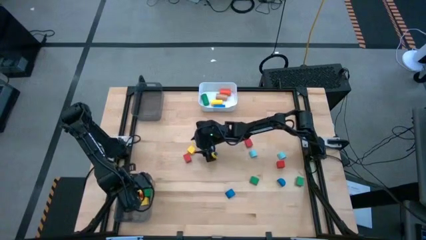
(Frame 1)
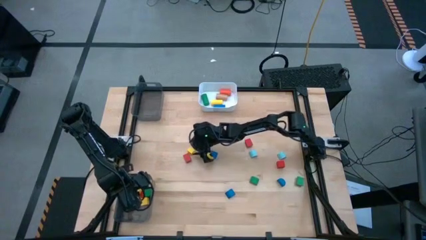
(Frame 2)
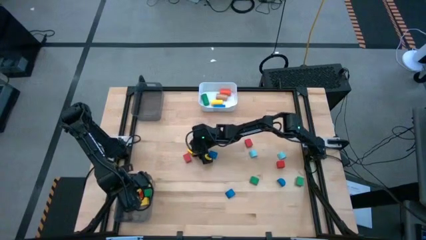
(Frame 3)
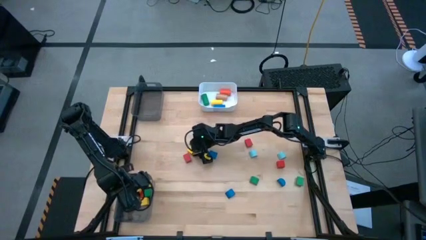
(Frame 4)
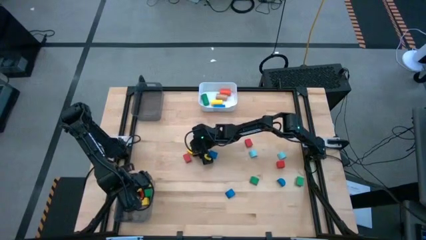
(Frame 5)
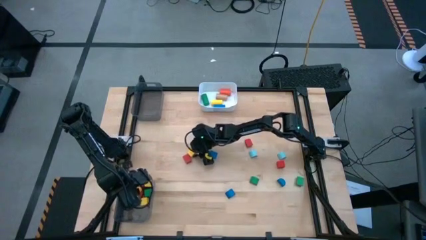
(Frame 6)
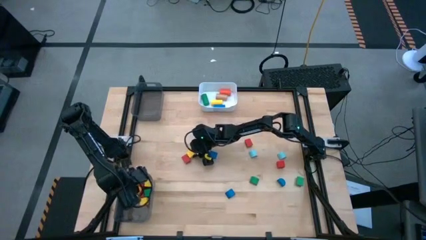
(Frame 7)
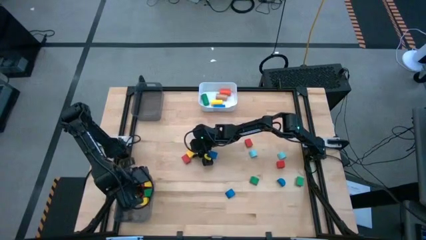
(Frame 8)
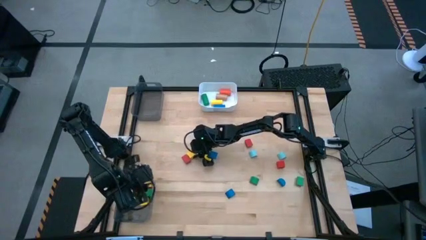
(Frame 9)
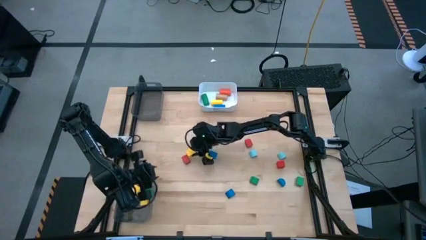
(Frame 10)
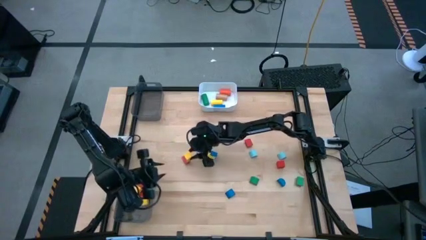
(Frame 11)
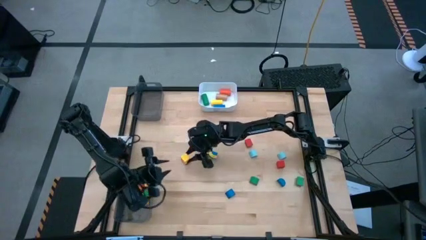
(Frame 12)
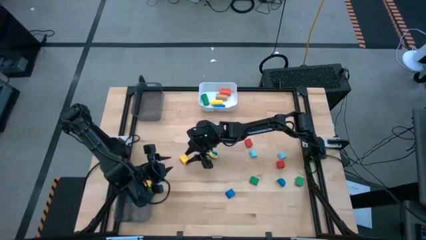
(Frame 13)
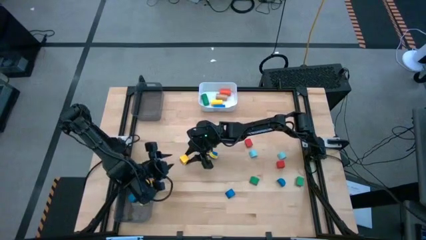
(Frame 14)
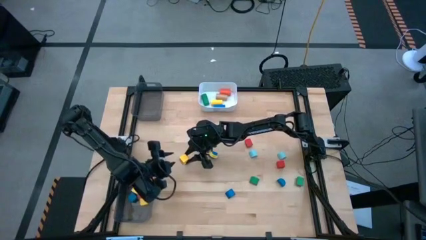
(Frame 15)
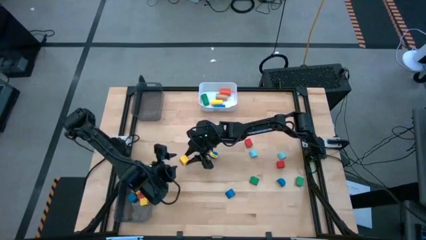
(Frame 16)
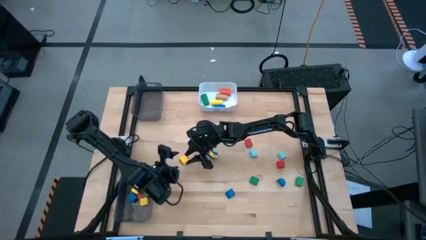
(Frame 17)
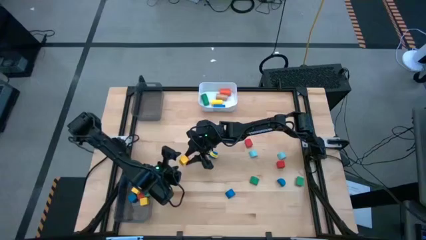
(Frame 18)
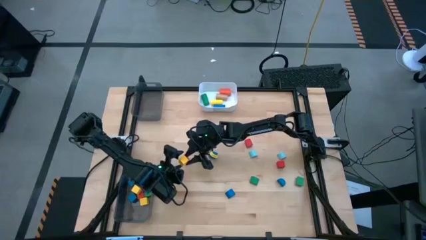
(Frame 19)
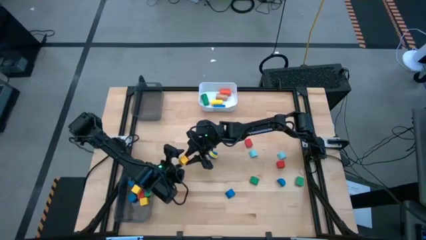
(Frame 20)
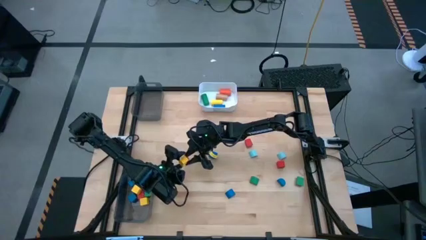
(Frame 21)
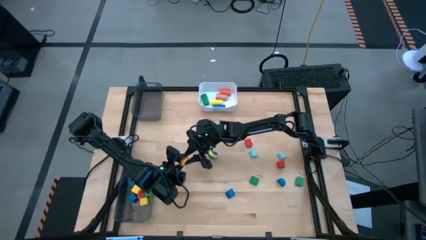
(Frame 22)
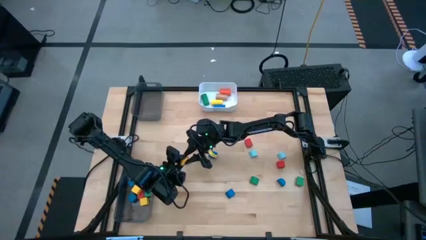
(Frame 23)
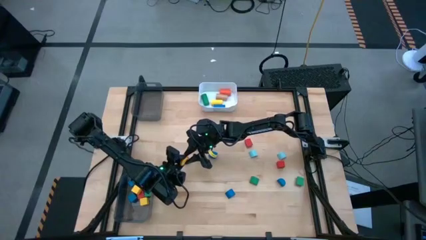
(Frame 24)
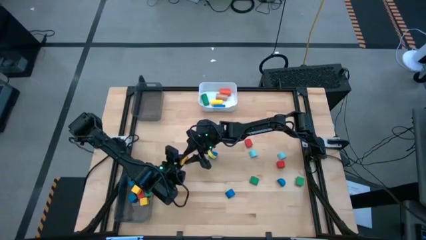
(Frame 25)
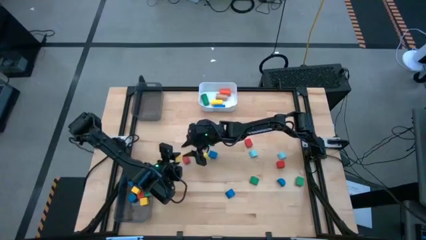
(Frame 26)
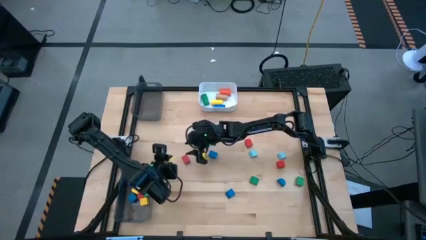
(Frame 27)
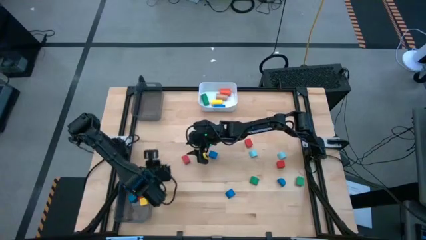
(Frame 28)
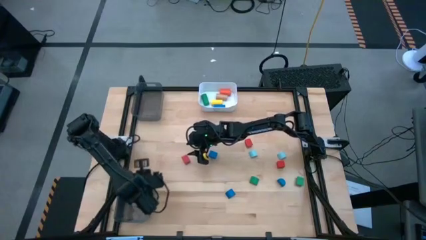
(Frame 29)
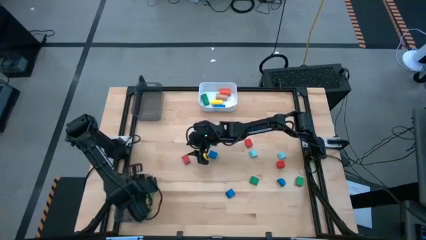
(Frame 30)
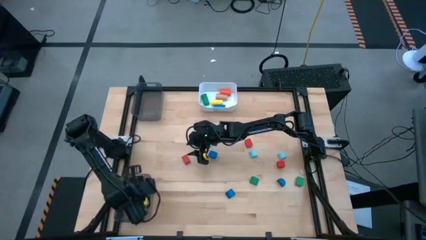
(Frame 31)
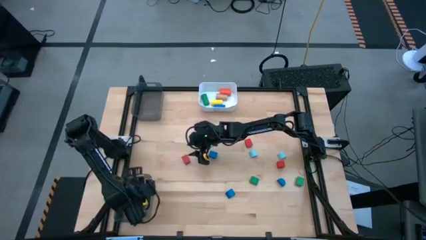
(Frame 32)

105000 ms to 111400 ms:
Task: Sort blocks by size
Put the yellow square block into the bottom black bin

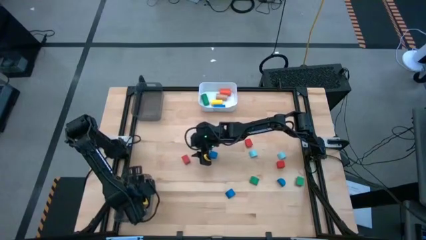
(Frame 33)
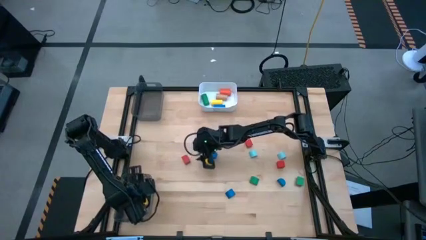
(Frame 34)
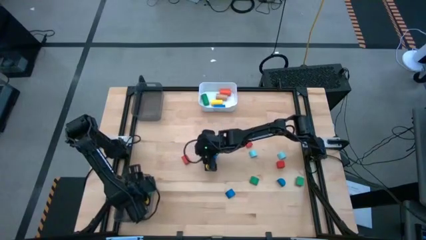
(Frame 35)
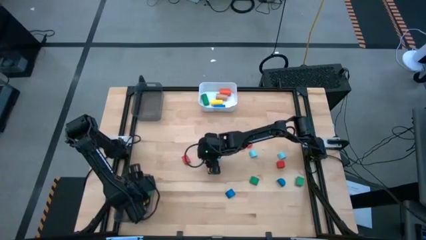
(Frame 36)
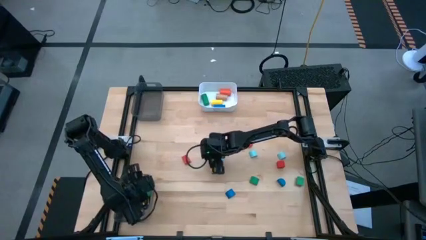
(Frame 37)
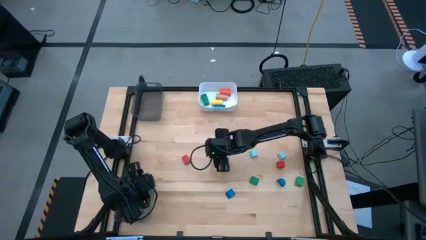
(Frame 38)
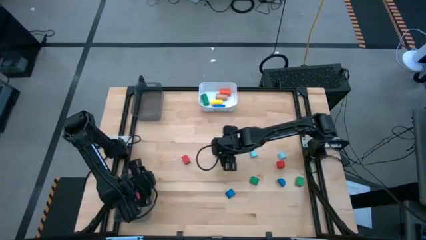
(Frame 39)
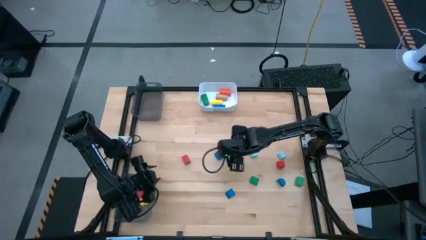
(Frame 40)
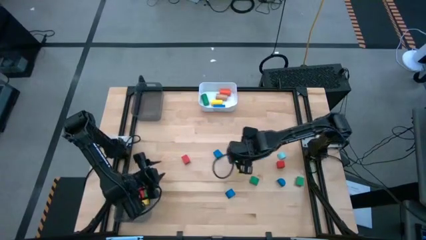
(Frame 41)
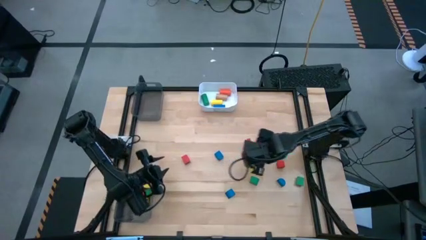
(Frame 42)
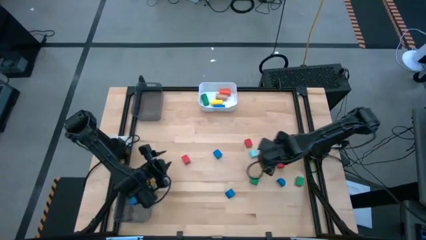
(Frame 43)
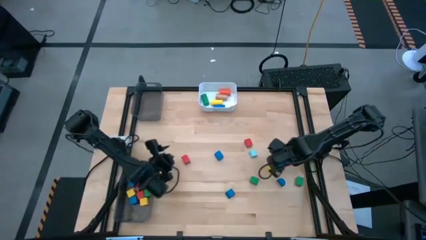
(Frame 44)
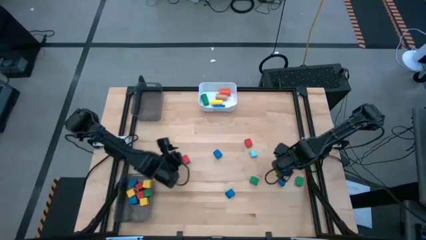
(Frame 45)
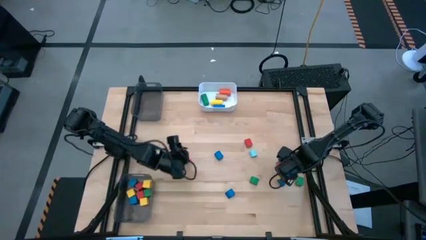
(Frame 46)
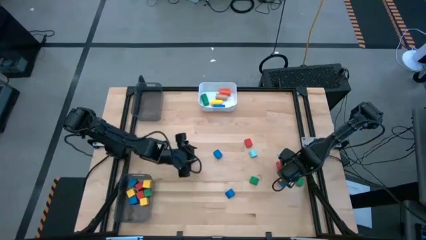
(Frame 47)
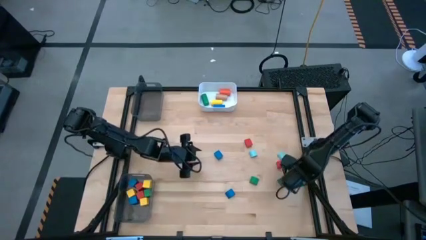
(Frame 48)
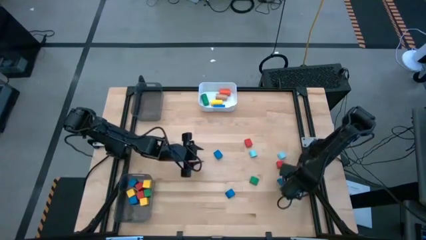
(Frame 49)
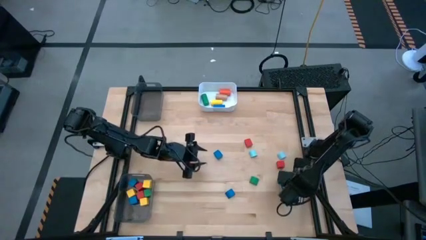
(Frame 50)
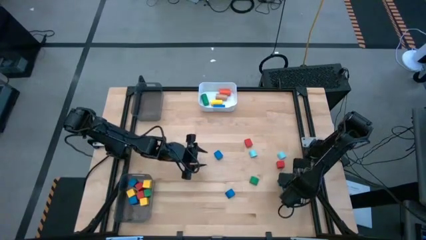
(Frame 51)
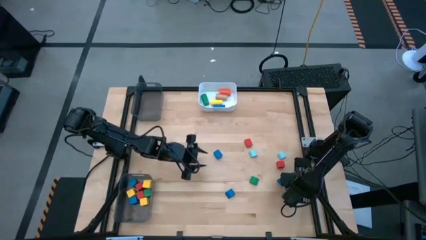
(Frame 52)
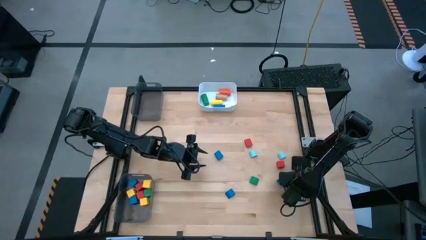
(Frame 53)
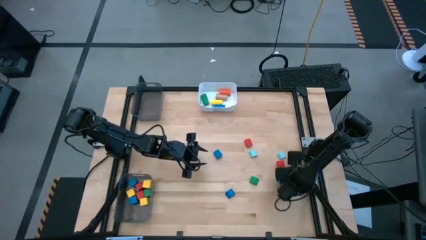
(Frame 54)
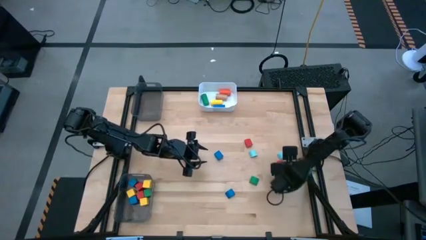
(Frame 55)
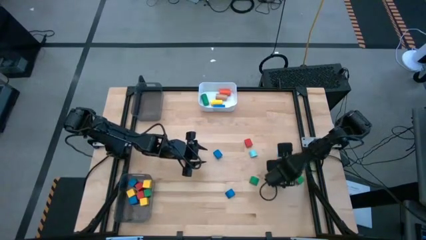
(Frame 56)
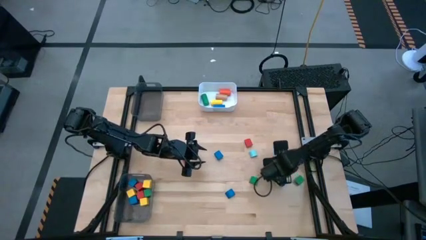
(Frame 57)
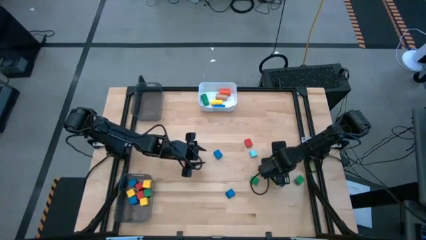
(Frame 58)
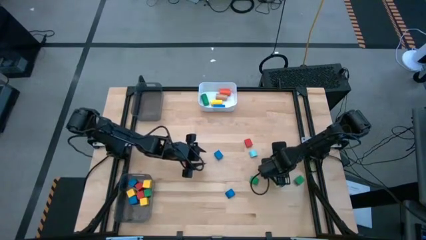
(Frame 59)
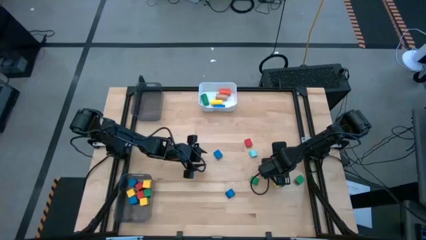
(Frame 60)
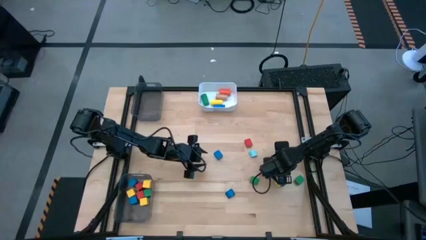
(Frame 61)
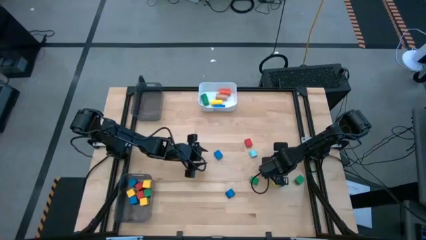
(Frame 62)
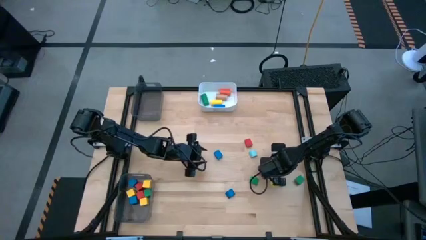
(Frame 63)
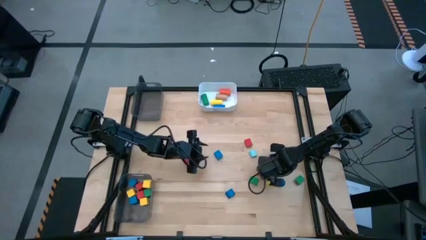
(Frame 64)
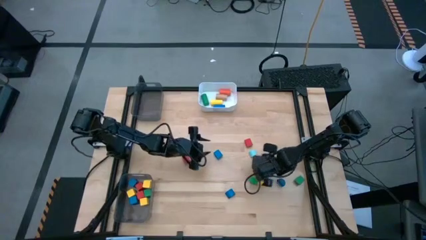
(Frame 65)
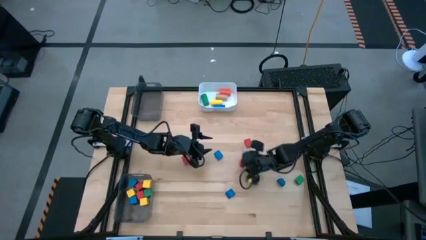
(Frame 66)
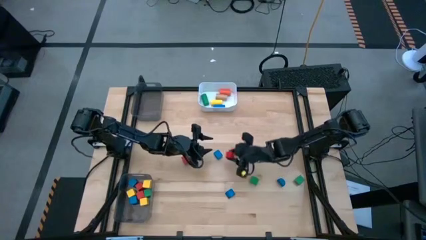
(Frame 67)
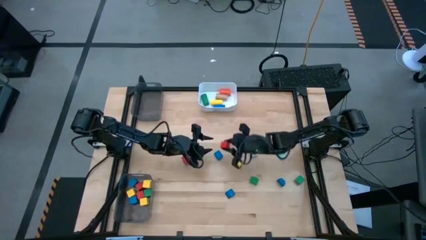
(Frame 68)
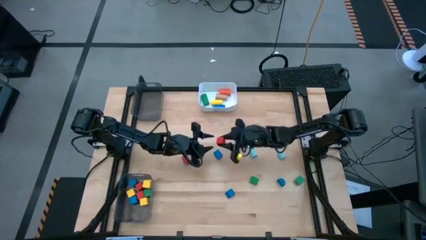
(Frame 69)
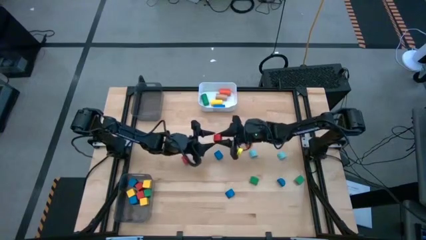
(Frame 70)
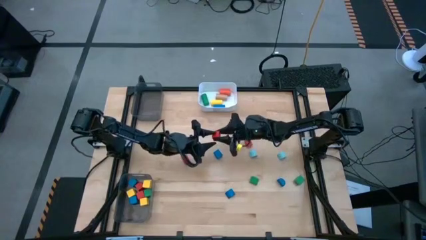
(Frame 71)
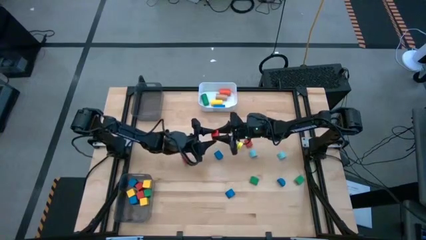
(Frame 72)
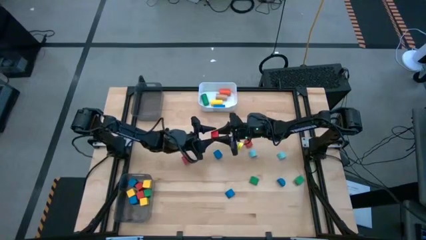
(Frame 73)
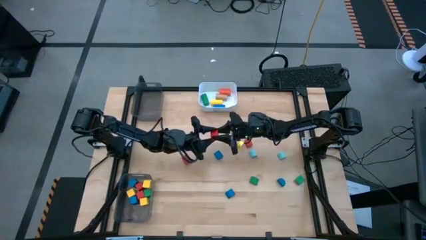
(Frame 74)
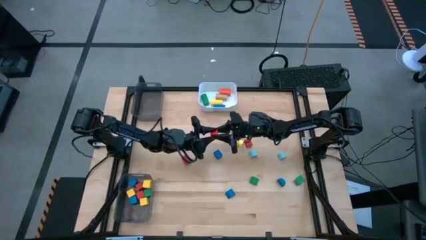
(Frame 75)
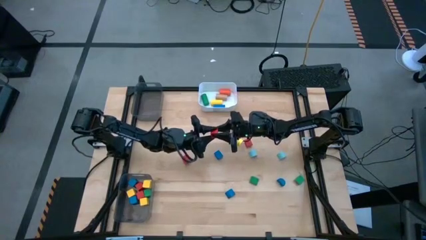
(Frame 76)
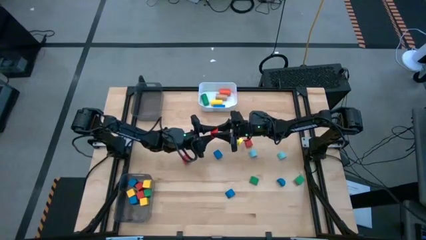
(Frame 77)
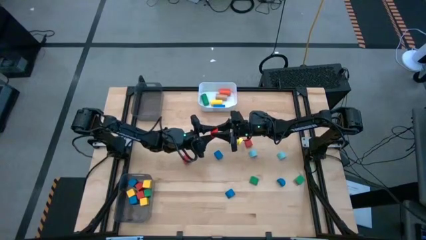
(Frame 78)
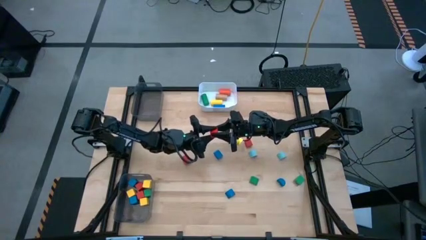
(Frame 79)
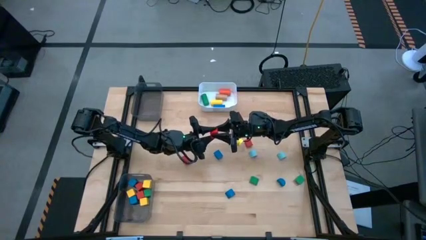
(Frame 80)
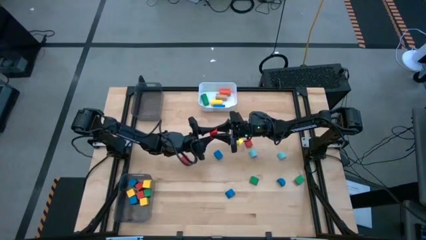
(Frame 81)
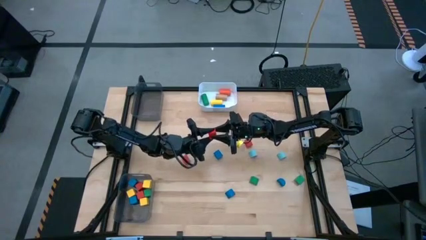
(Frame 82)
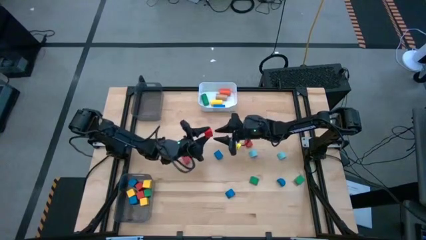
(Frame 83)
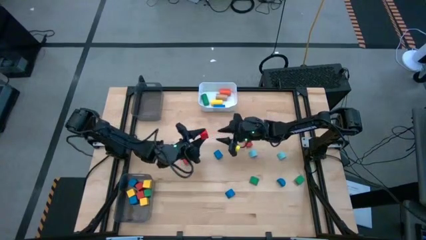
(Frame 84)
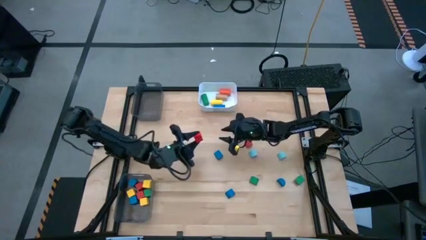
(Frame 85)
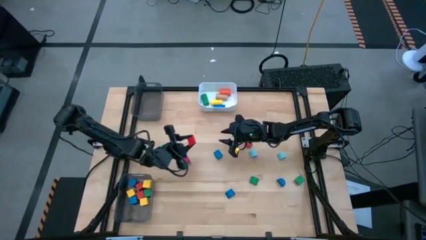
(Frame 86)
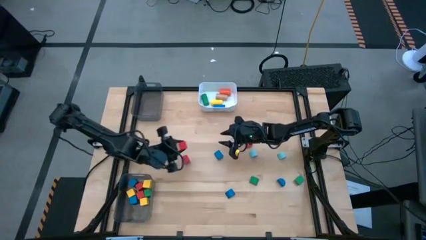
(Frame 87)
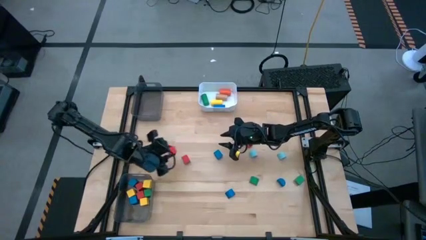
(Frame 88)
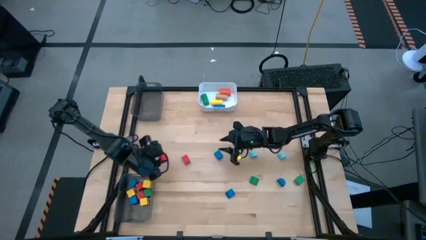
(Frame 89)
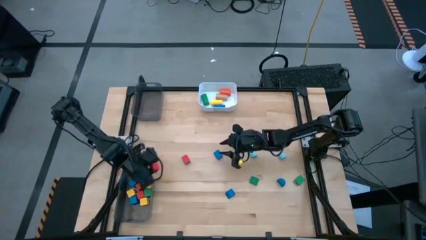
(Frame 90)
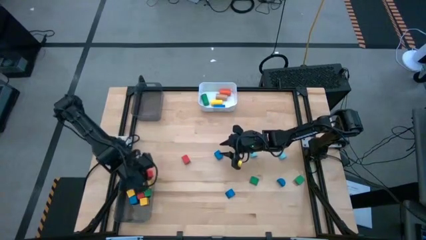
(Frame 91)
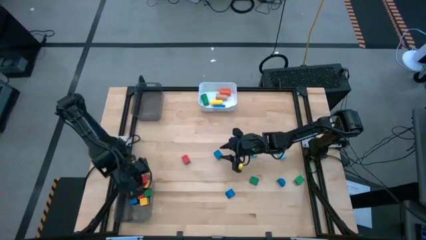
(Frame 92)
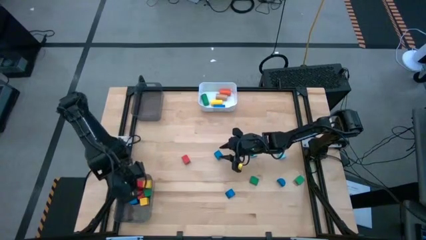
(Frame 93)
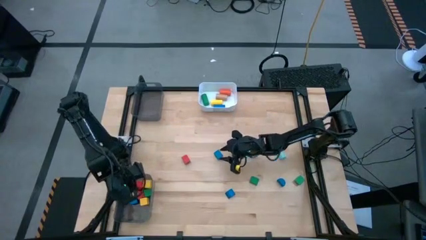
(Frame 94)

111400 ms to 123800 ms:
Put the red square block into the bottom black bin
